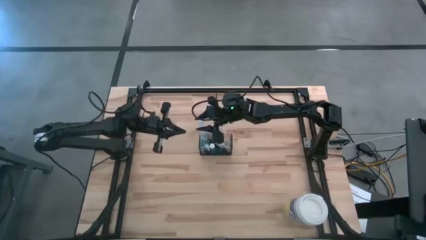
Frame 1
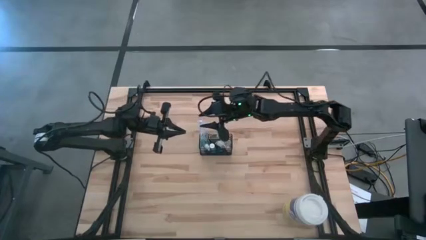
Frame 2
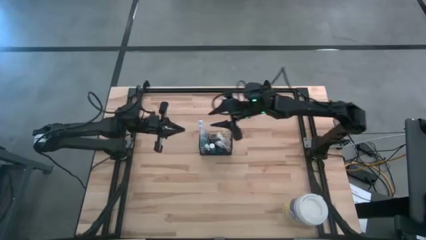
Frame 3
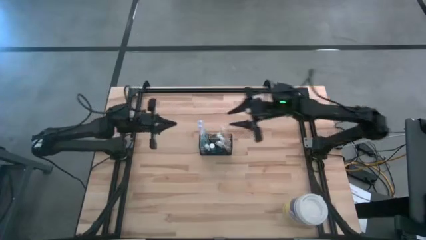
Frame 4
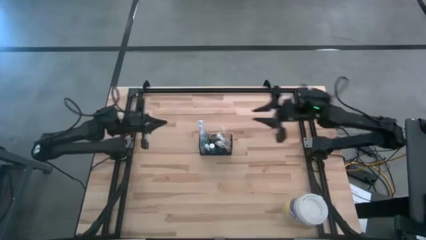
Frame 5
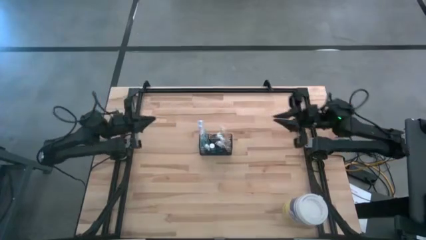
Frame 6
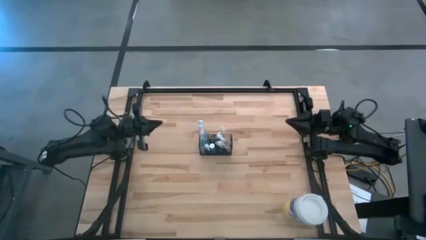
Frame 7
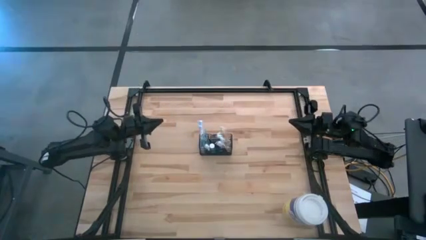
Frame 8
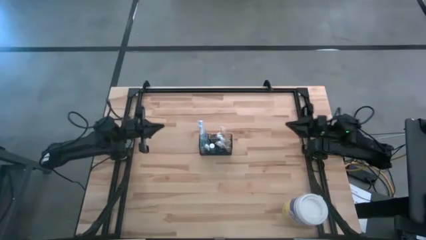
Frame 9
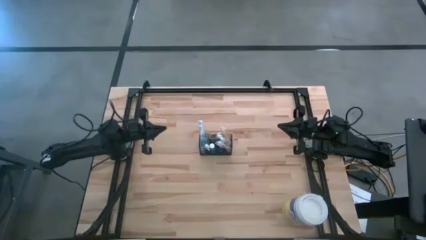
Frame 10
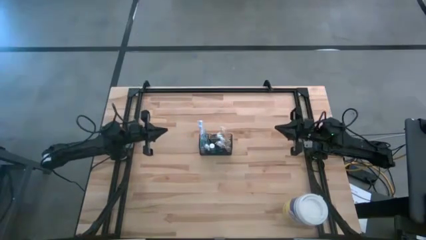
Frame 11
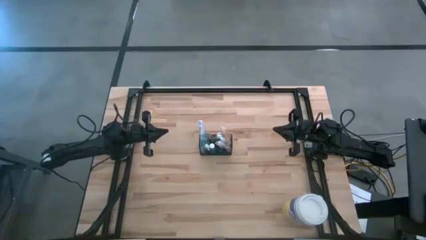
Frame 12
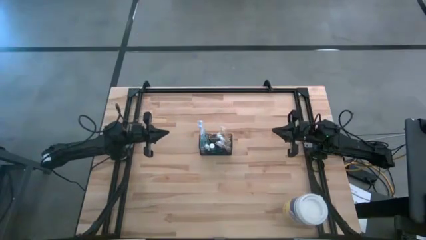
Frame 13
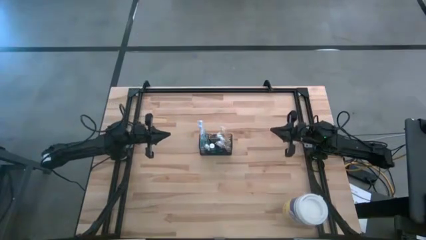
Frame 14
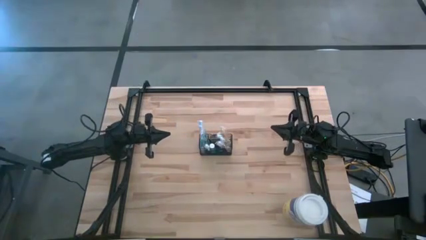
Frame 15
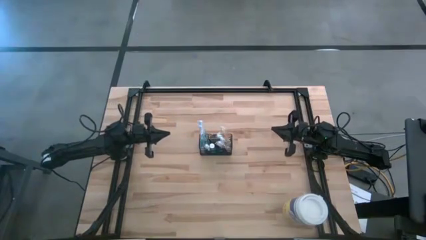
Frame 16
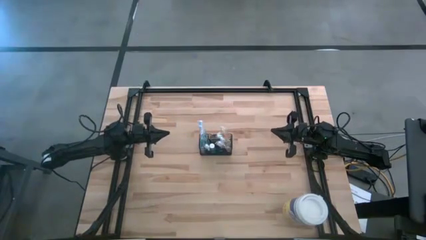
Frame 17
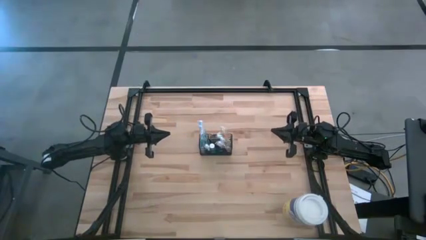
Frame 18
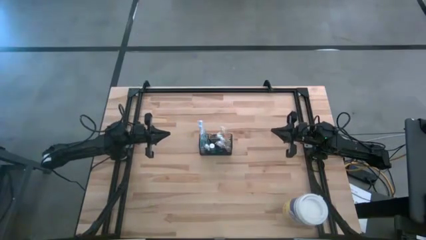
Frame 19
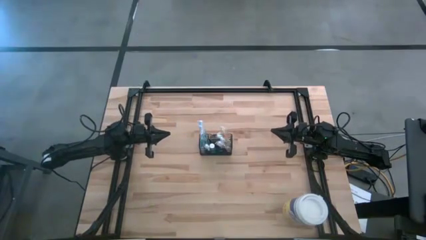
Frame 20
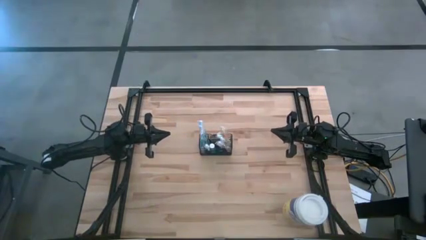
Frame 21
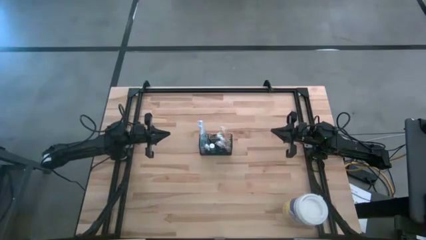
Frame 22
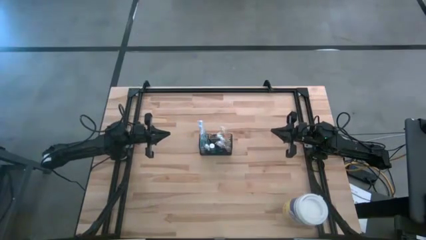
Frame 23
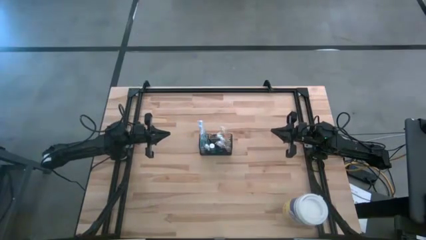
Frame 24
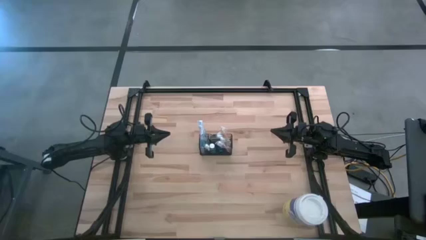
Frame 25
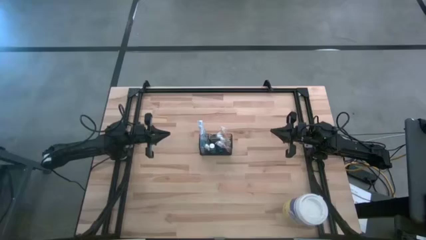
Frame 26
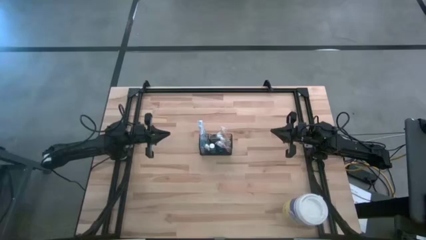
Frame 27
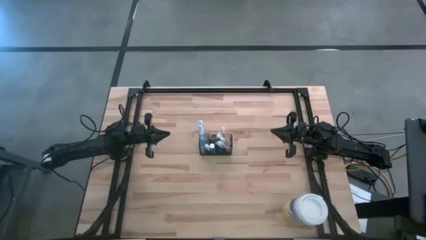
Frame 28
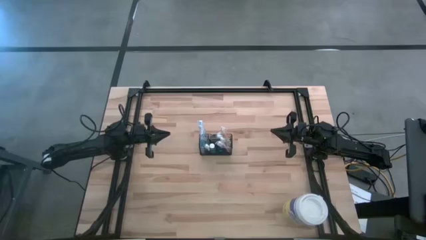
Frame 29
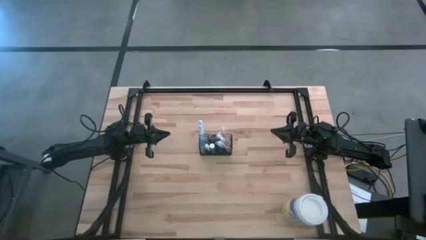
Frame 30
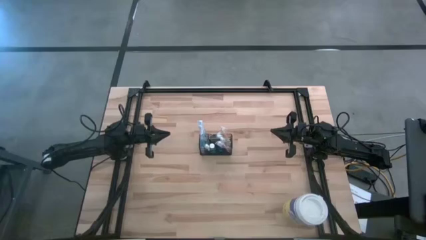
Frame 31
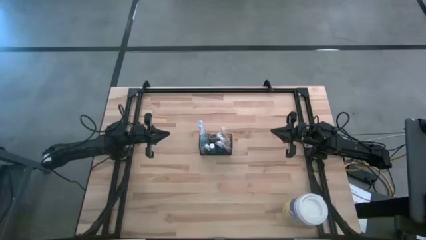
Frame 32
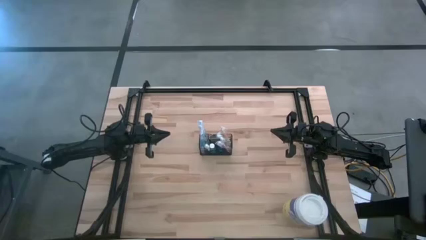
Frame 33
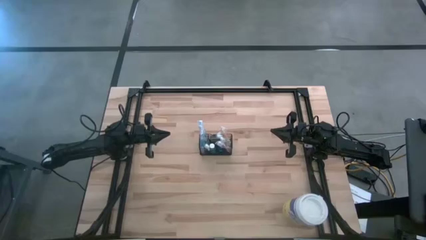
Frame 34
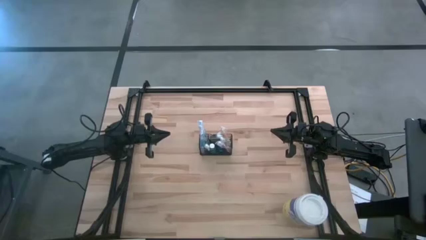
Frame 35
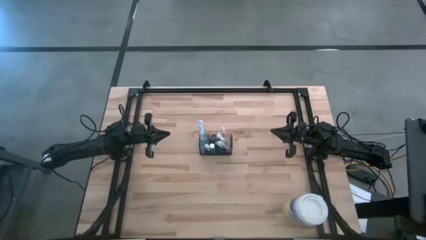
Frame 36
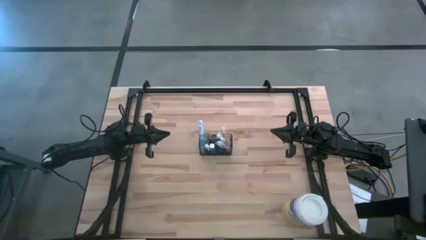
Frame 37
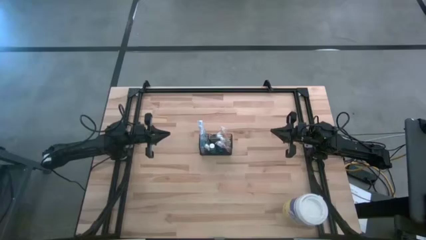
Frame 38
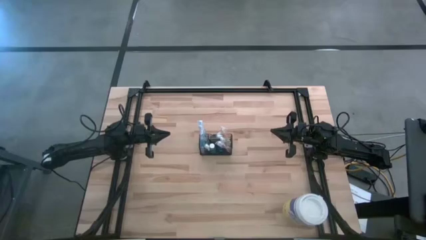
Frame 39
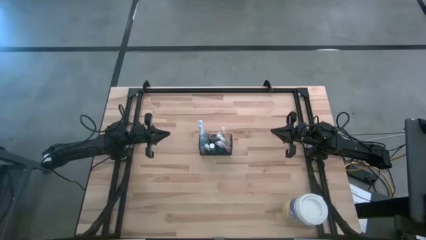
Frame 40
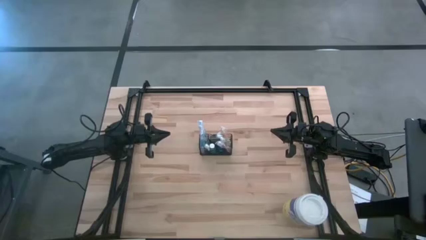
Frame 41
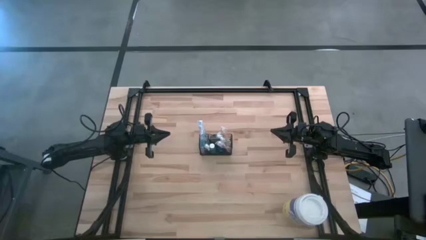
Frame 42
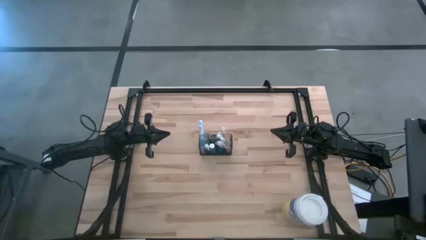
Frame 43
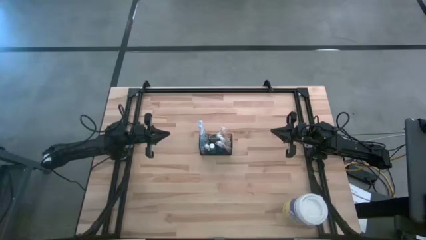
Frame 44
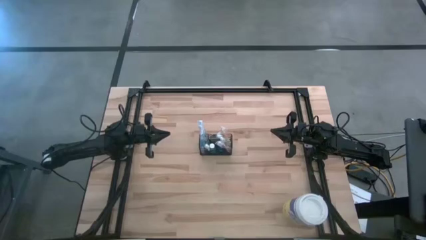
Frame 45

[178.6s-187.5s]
Task: Pick & Place toothbrushing station
Return to Home Position

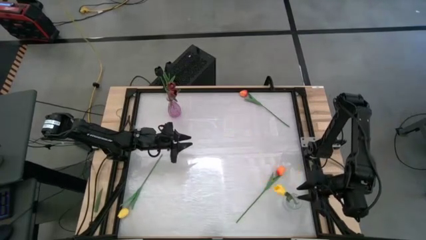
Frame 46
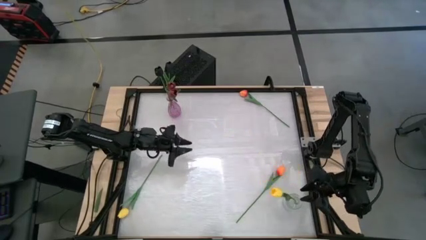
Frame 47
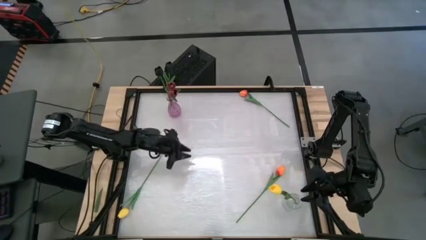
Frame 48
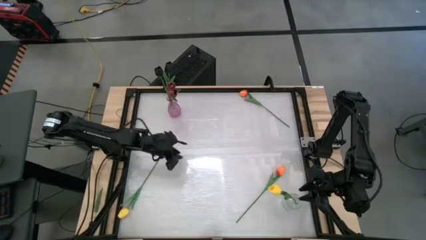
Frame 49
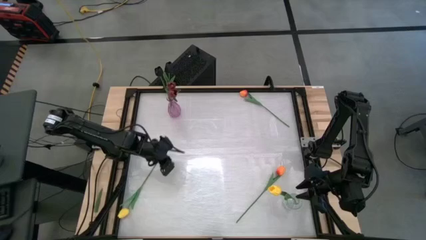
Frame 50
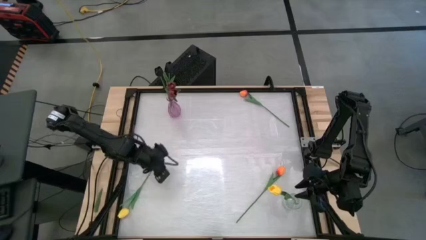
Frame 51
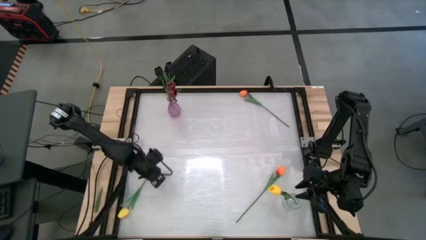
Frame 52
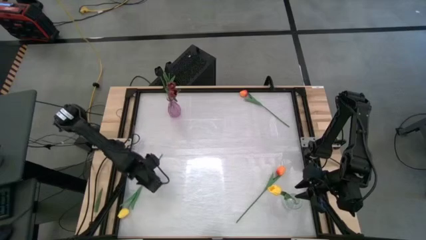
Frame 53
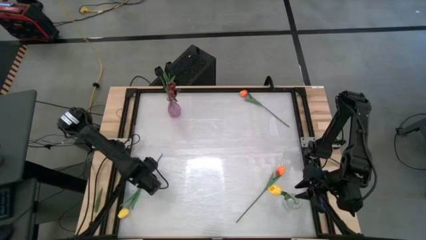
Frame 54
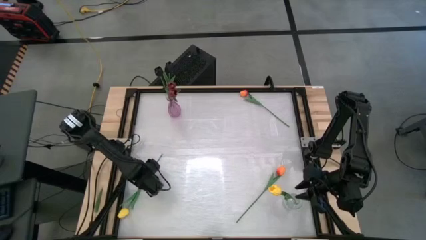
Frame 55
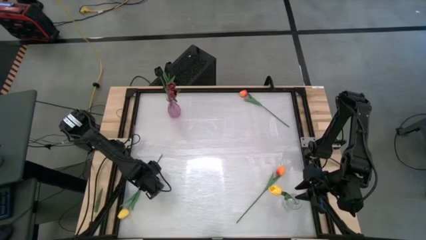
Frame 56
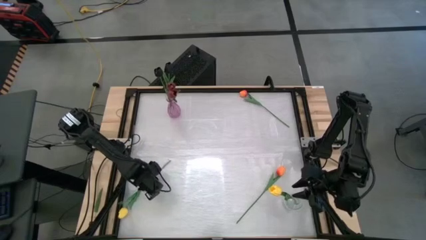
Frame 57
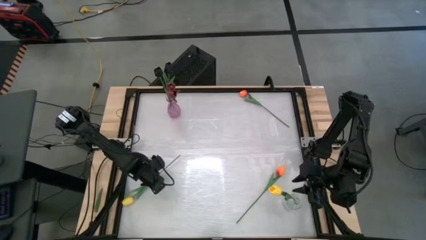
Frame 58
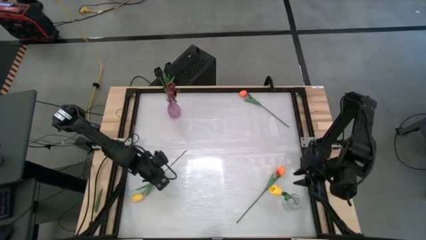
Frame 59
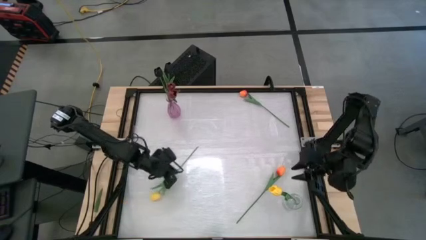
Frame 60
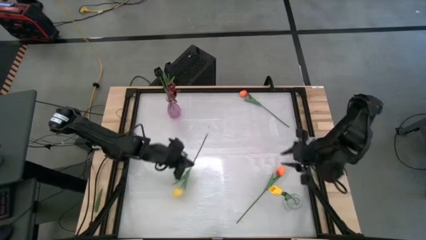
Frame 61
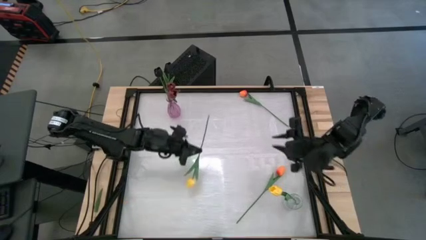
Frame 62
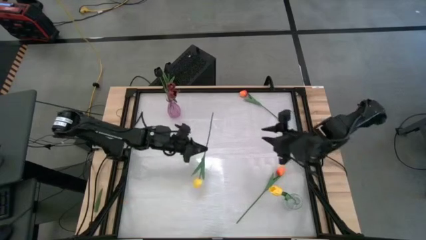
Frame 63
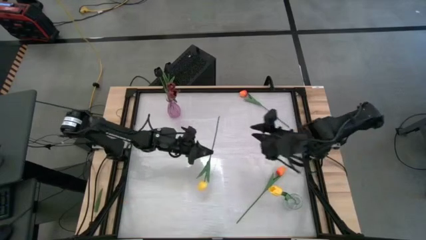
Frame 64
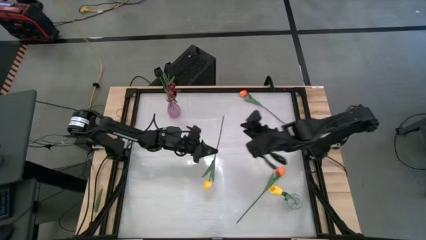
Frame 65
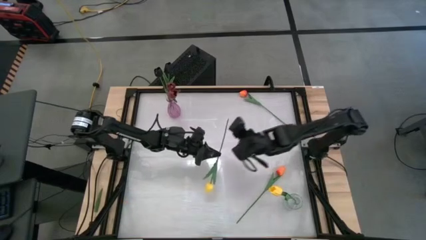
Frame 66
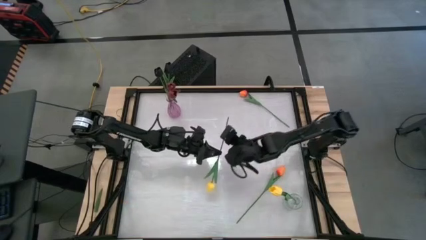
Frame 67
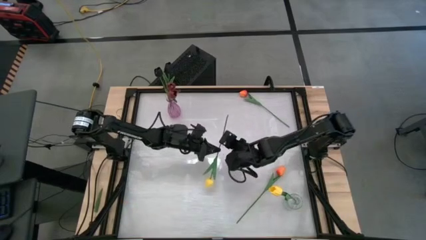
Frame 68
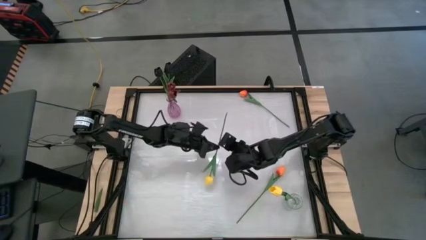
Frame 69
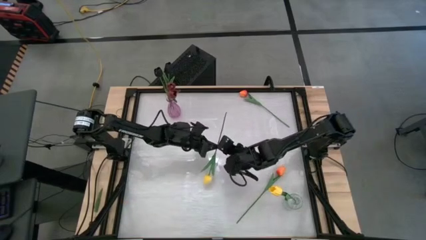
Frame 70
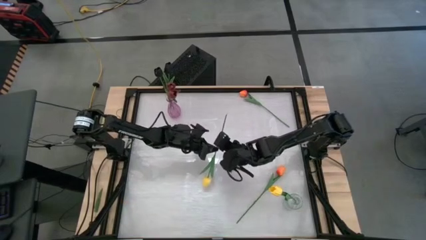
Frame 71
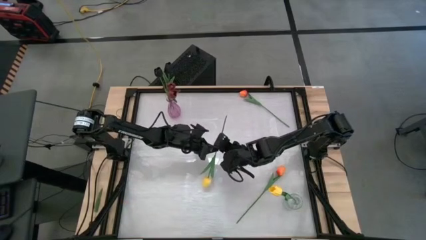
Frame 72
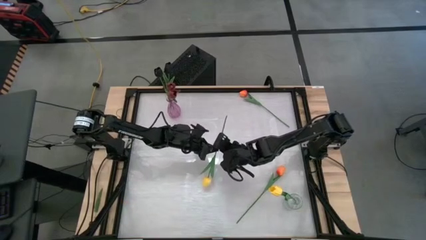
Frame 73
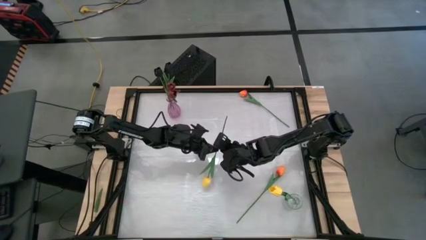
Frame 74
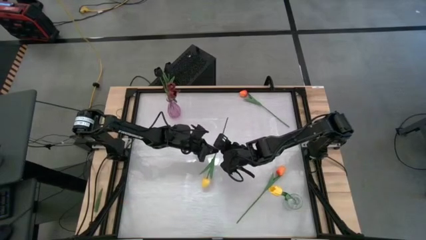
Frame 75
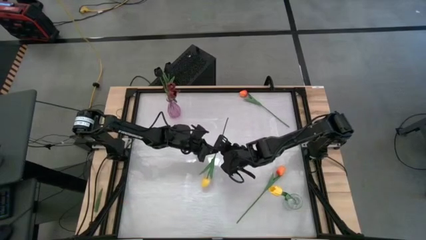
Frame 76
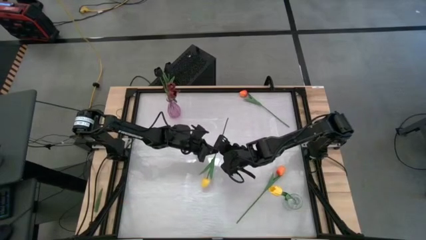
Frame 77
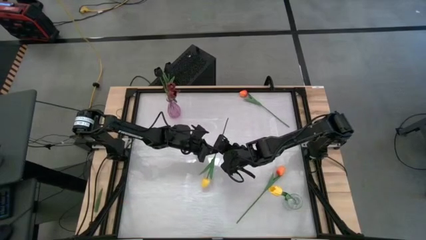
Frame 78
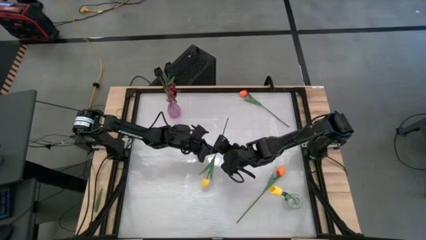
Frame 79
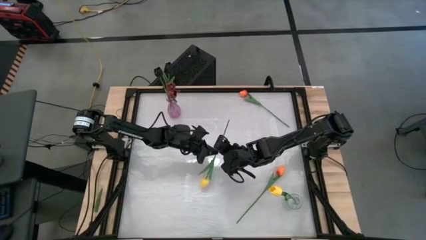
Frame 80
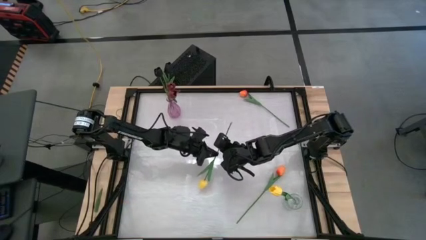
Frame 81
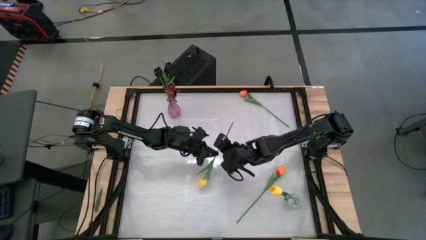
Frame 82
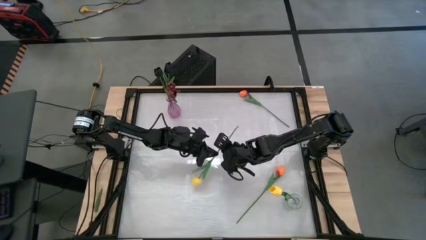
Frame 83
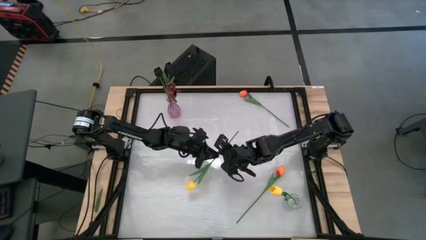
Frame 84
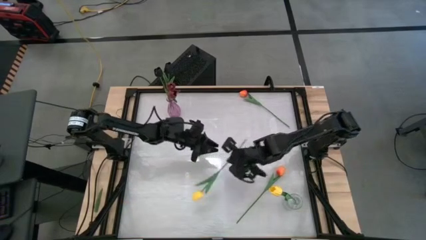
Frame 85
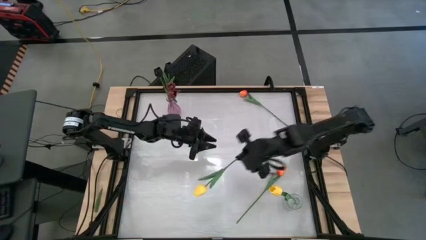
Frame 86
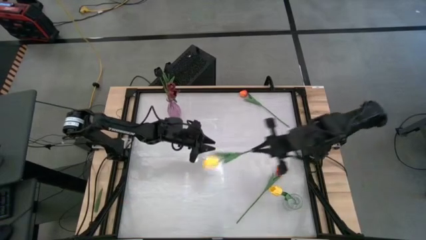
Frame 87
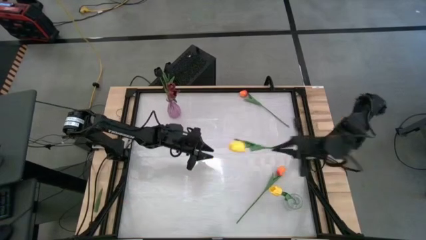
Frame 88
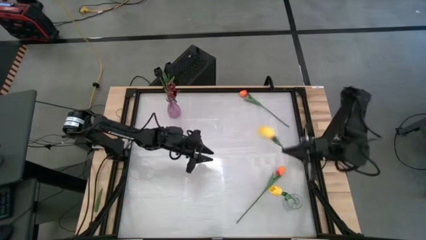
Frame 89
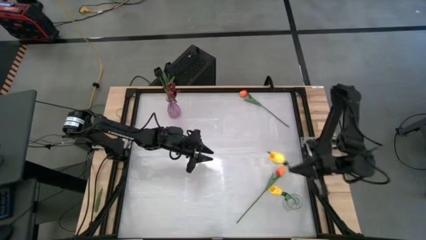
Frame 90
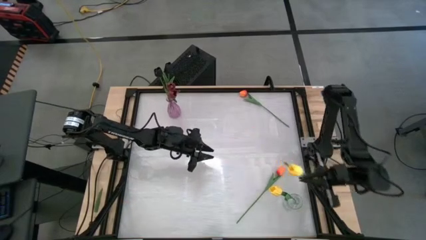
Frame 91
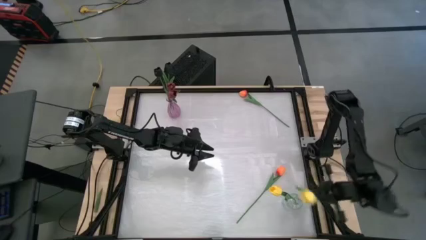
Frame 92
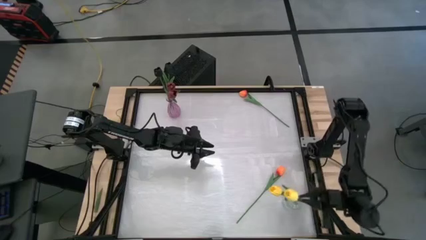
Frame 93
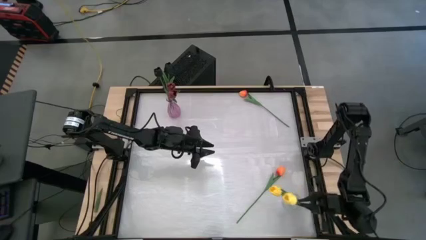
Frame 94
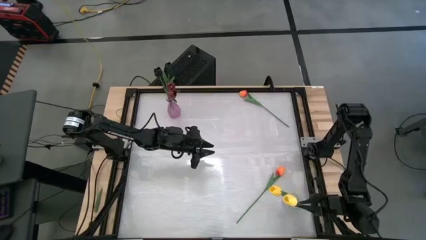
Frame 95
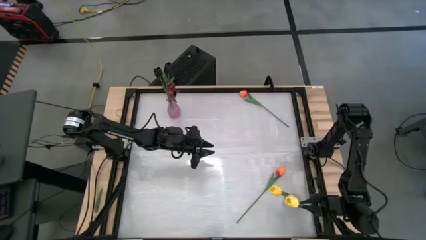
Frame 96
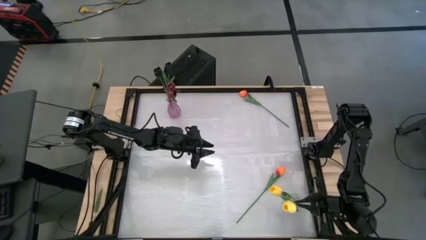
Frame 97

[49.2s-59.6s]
Task: Sort flowers into vase by color
Put the yellow flower into the transparent vase
